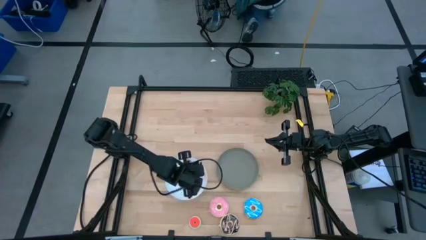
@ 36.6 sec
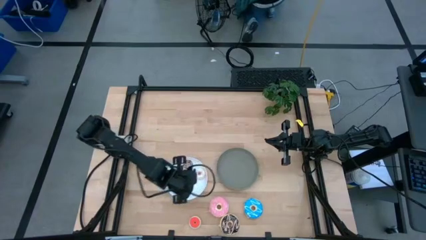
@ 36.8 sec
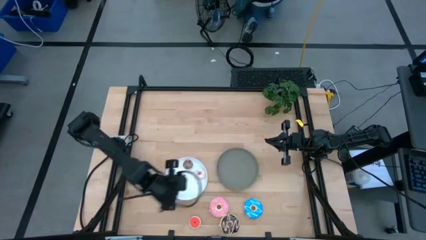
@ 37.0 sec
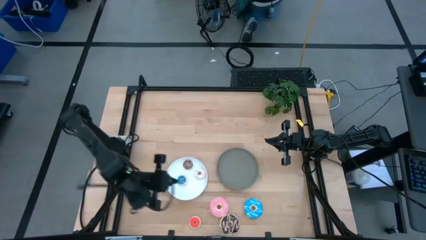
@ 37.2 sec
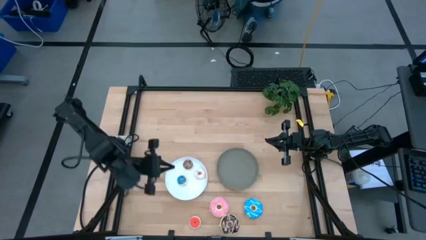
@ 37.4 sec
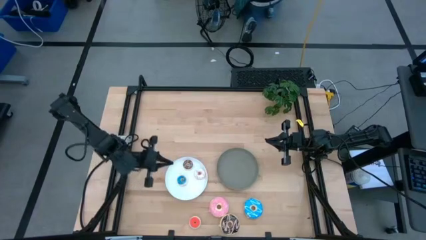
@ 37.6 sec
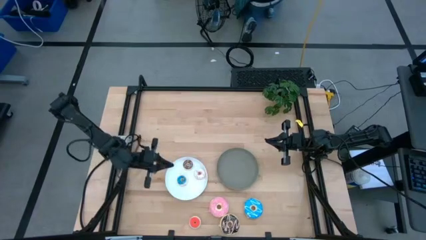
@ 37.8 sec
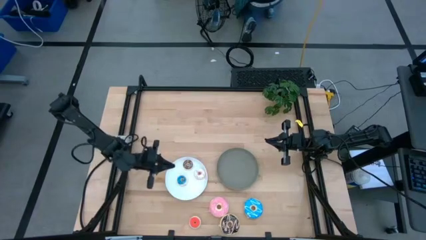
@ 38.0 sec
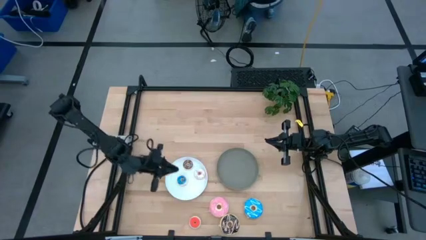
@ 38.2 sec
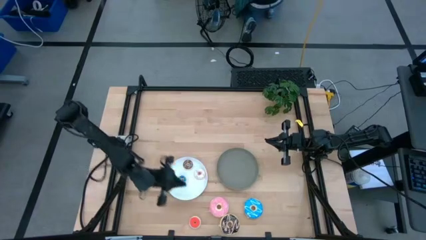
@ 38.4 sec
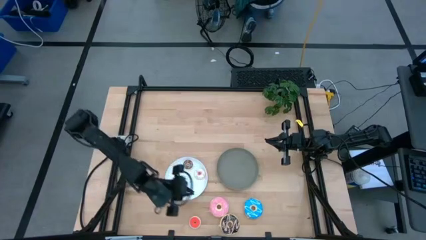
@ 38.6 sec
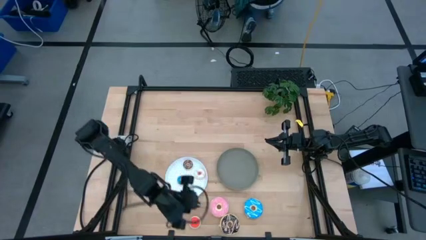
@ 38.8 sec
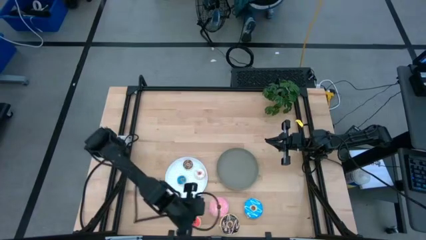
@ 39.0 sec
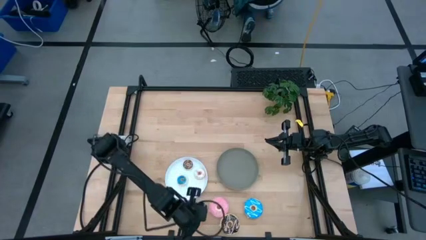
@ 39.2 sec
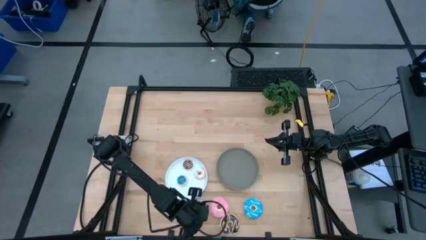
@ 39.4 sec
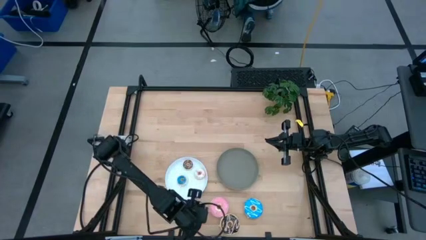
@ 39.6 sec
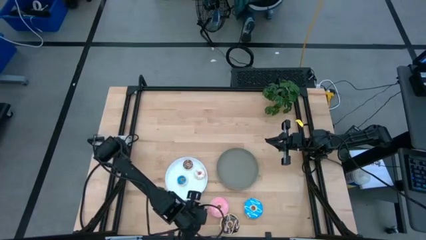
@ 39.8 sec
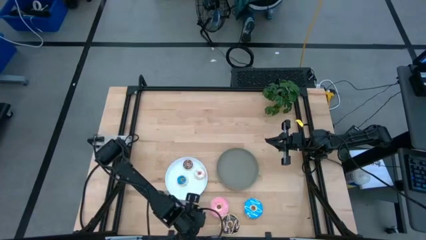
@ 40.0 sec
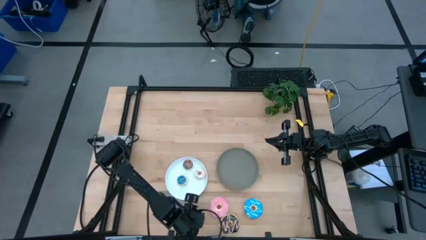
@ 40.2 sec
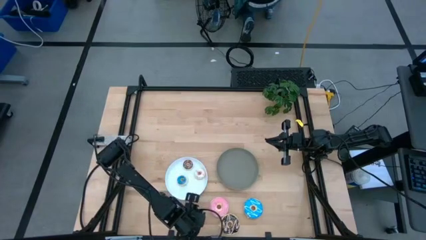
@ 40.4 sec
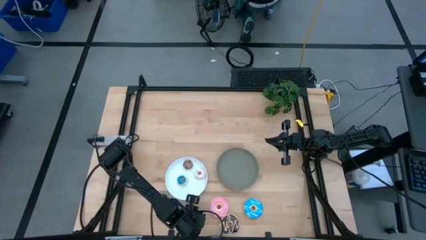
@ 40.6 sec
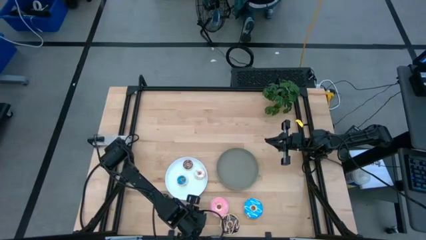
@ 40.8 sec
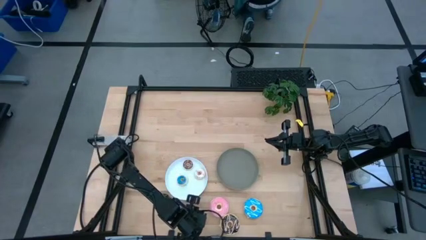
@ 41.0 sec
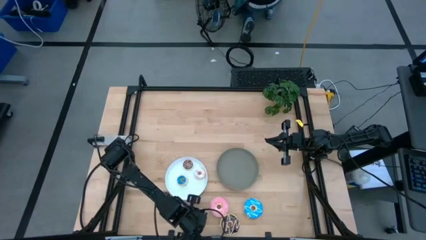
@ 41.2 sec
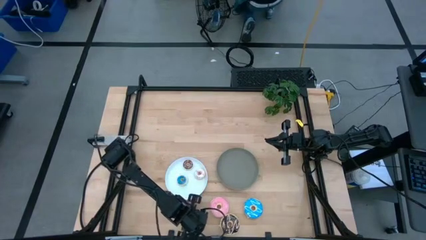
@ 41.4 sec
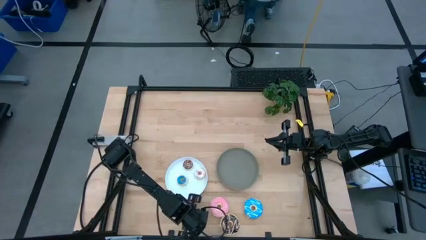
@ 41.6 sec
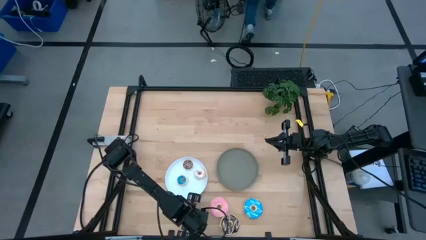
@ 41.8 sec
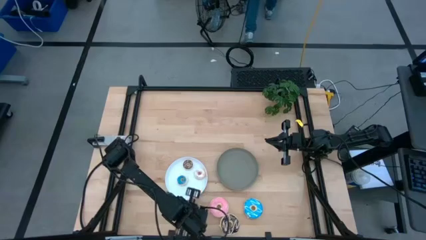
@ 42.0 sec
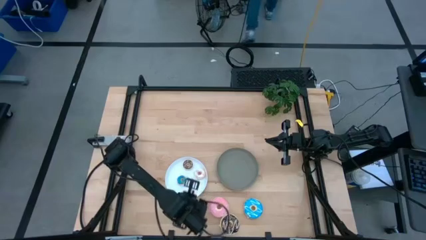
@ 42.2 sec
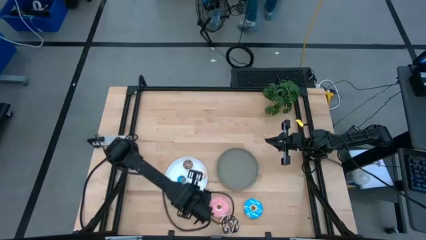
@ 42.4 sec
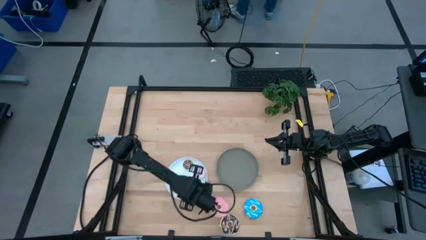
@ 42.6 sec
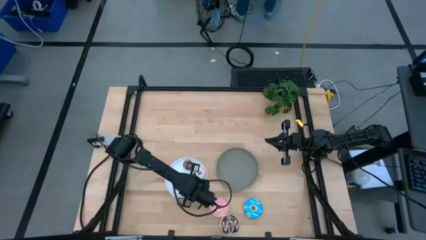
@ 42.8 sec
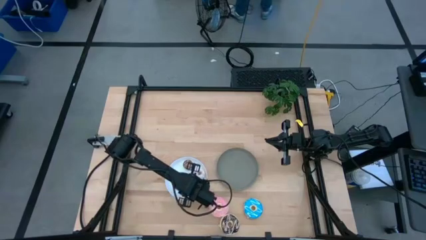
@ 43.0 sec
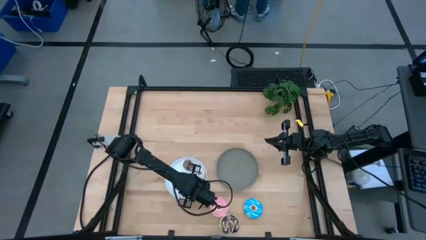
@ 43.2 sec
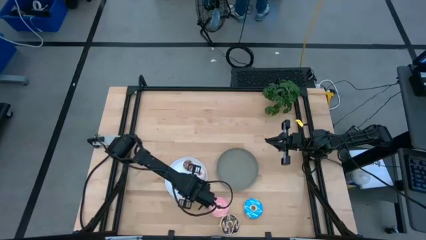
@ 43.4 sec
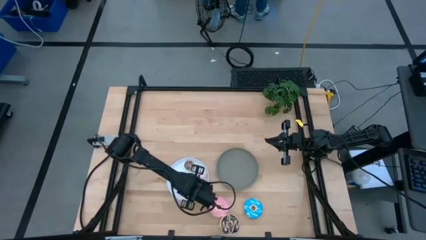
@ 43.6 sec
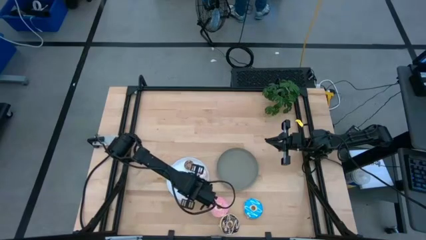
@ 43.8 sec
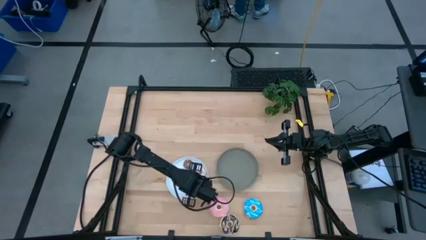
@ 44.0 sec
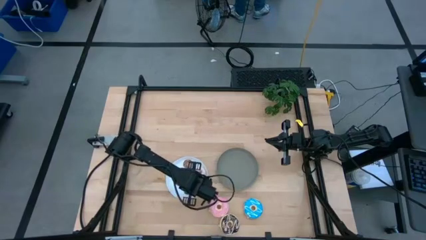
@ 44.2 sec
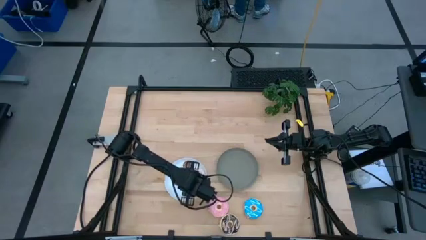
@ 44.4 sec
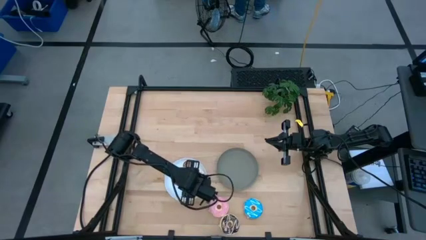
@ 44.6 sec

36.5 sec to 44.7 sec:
Task: Pick & Place donuts
Put the small orange donut on the white plate

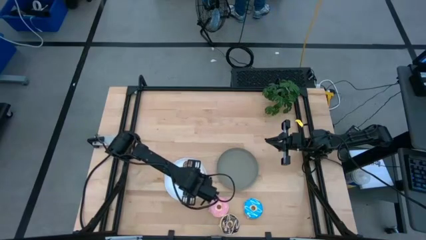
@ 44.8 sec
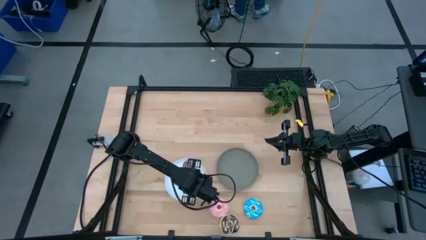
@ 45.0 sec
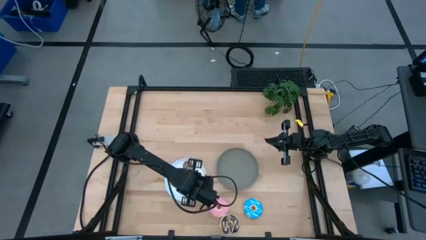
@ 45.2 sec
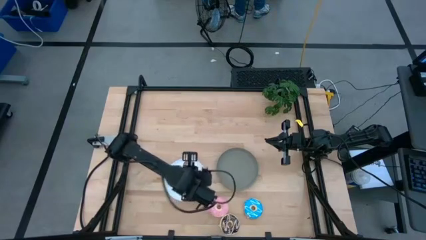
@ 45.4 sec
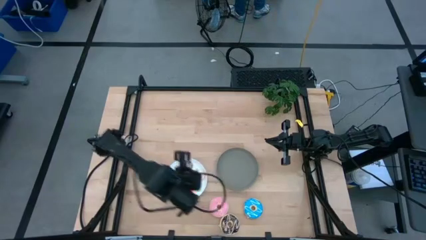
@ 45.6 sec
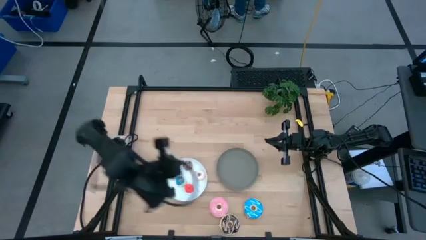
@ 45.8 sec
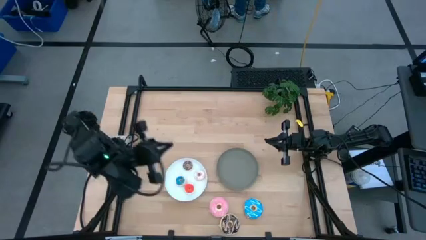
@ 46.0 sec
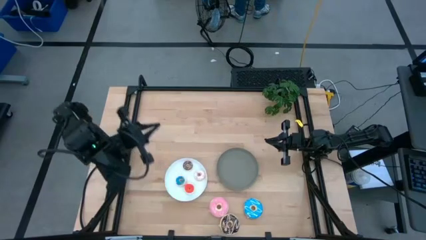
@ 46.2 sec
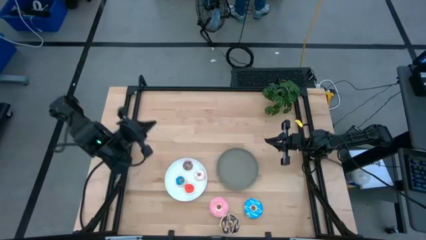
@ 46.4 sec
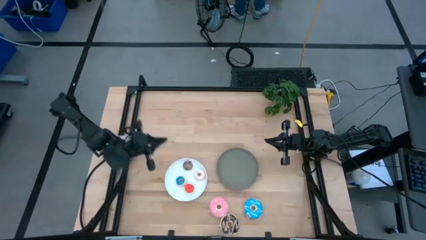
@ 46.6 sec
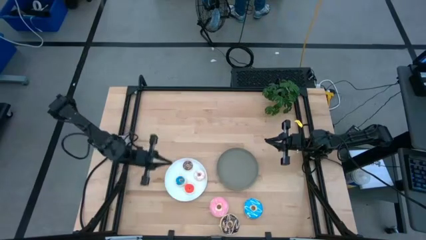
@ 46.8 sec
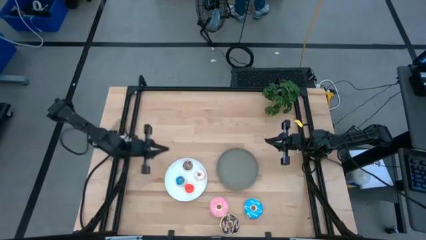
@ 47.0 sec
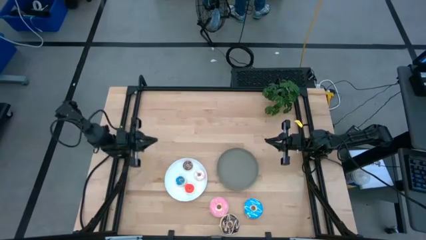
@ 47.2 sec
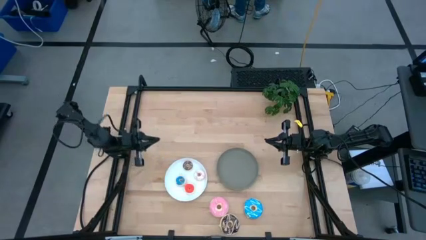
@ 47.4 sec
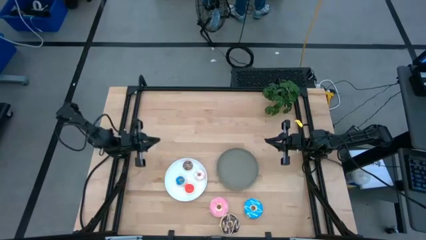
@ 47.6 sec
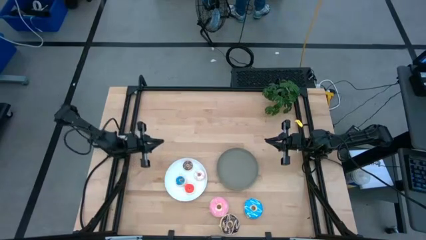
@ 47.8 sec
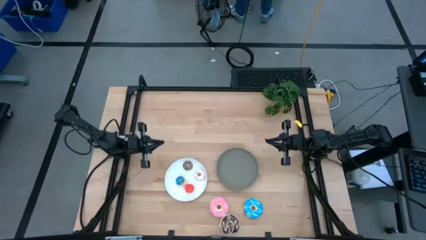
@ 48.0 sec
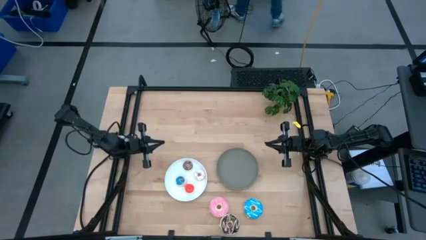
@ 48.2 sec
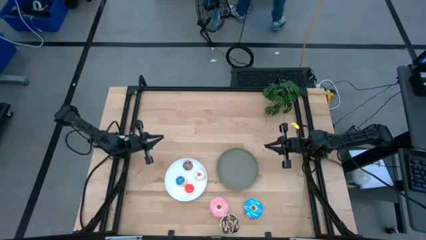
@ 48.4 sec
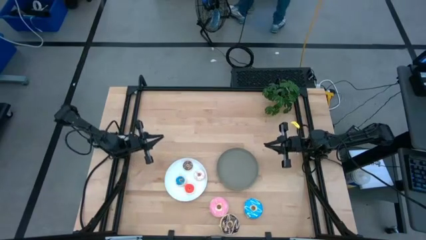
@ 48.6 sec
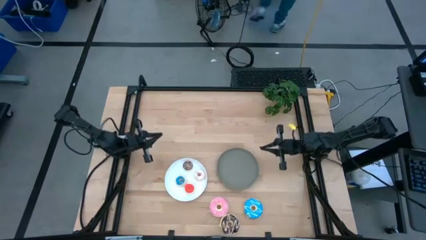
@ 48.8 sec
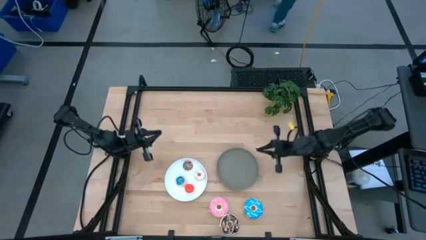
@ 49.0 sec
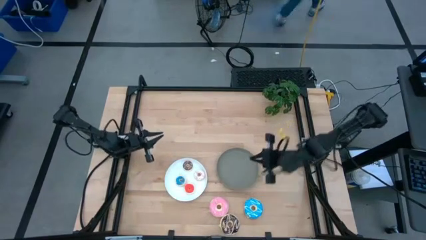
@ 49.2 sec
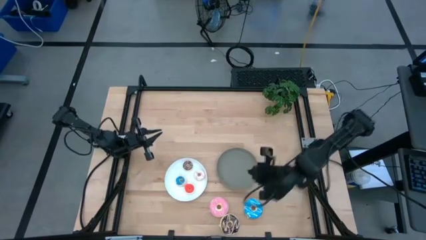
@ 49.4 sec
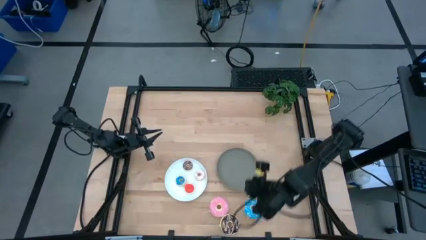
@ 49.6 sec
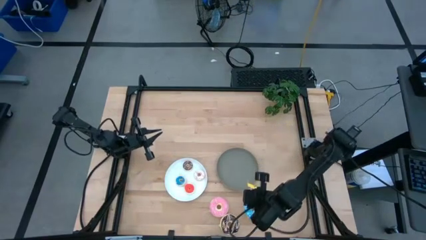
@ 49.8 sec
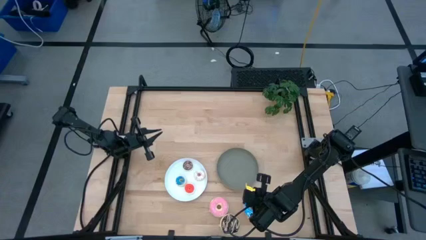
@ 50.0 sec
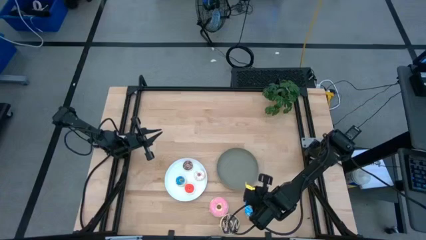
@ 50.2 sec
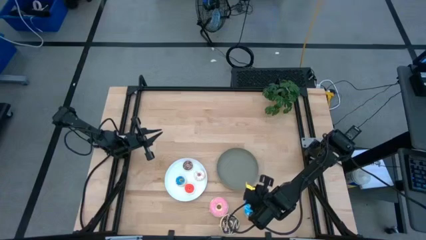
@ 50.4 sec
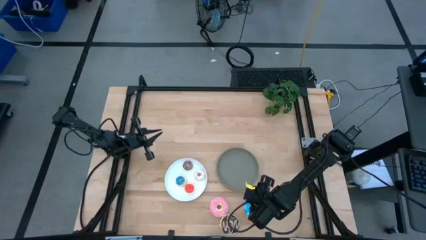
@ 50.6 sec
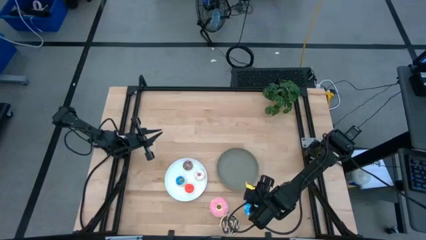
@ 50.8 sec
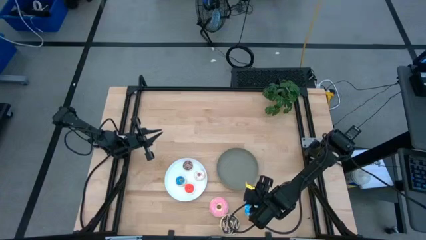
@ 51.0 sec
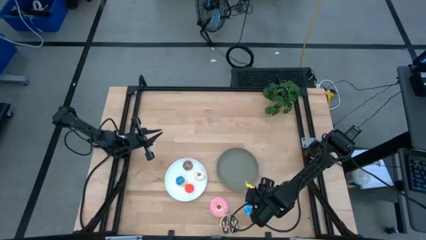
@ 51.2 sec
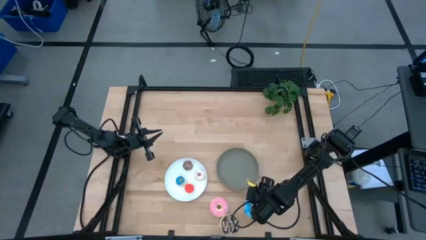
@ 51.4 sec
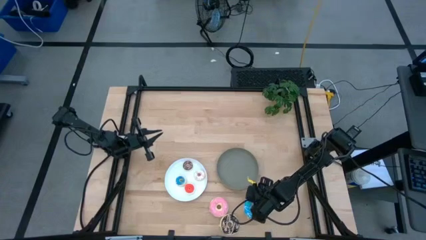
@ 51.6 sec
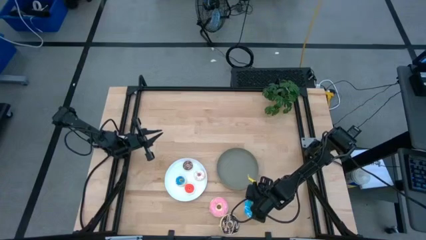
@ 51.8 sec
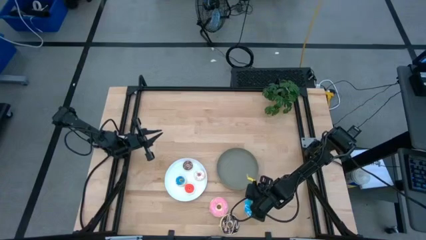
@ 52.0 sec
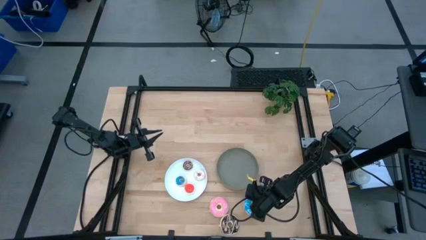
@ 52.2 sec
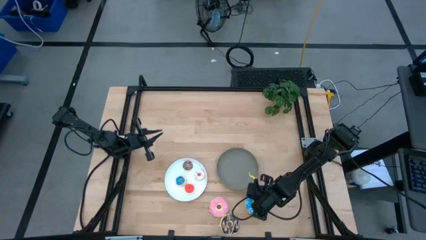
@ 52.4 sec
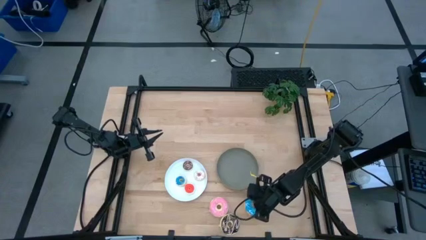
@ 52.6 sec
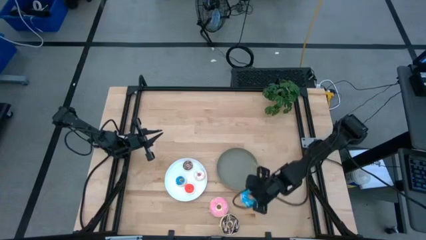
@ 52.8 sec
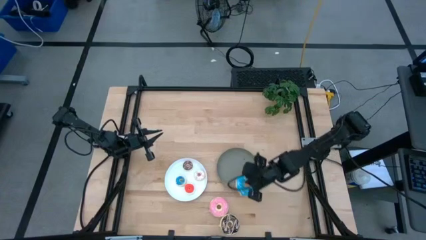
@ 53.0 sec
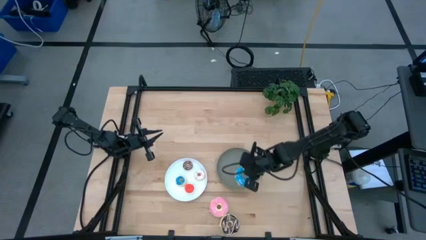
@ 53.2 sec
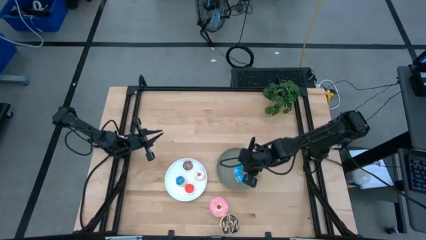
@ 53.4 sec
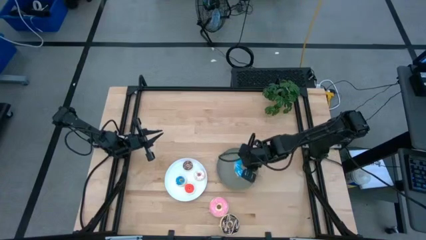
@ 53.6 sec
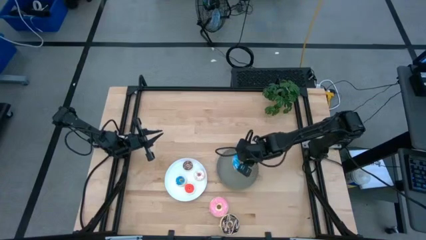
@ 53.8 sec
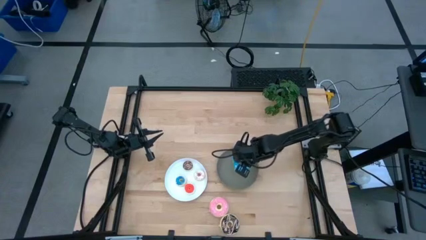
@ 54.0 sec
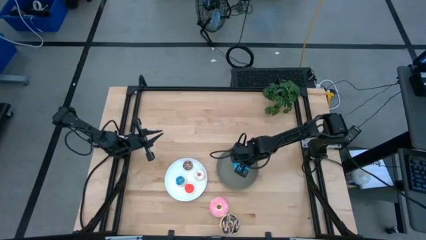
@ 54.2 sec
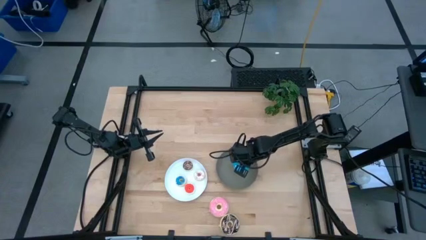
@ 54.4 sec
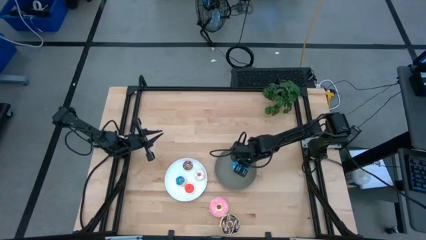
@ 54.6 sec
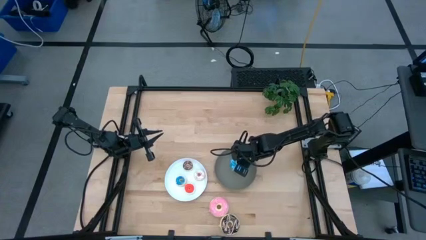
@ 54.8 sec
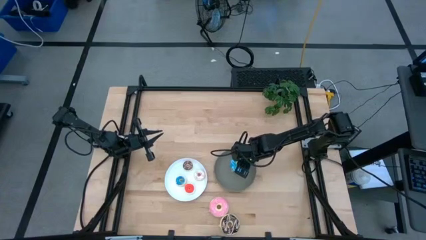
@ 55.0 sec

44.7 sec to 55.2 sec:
Put the large blue donut on the gray plate
